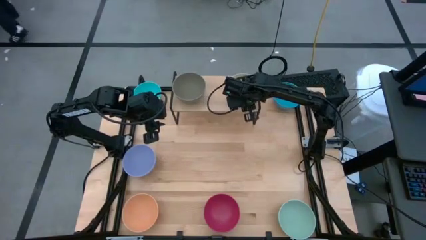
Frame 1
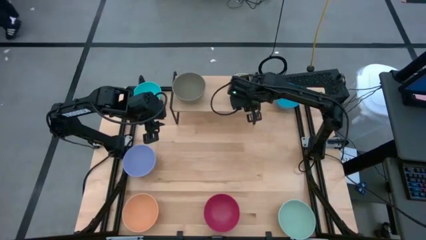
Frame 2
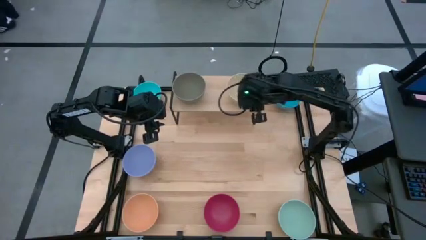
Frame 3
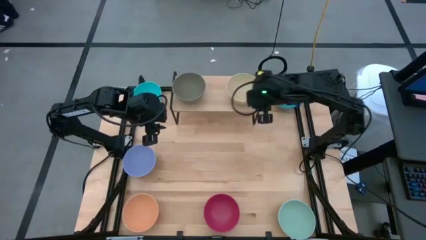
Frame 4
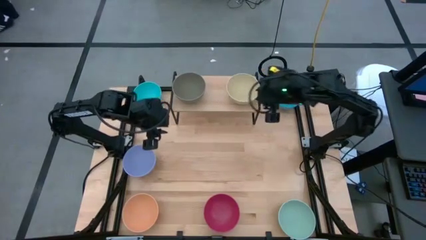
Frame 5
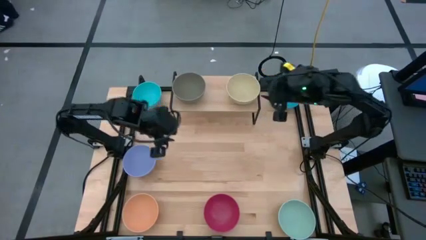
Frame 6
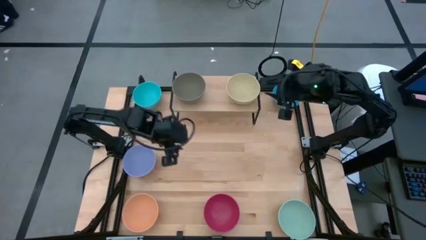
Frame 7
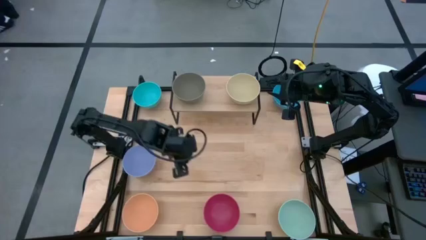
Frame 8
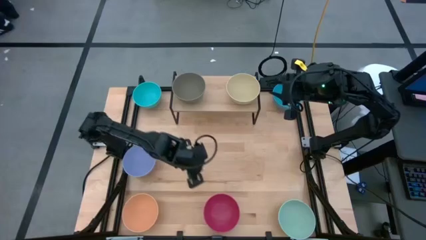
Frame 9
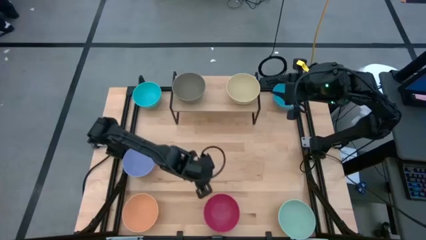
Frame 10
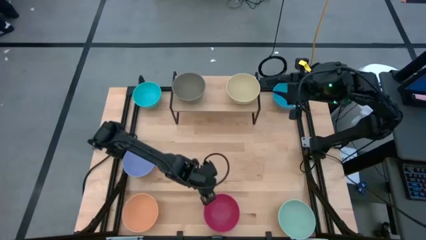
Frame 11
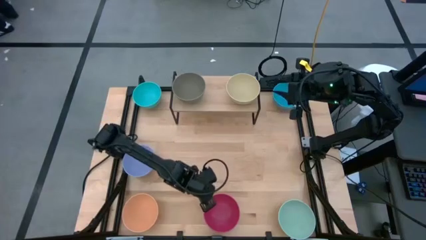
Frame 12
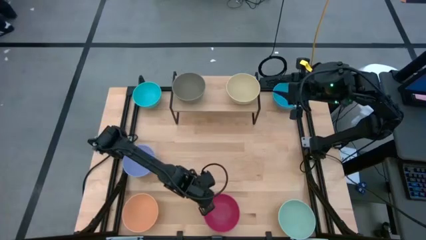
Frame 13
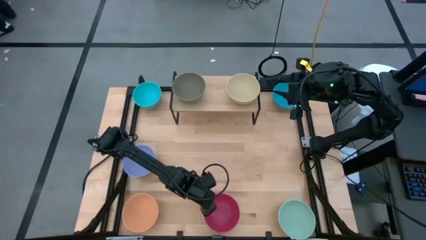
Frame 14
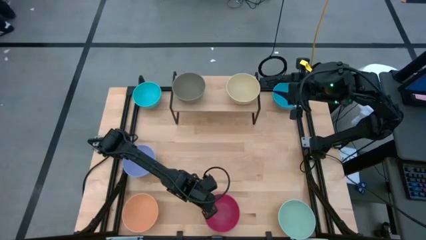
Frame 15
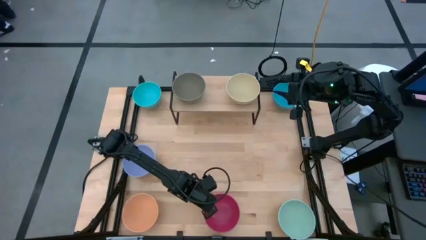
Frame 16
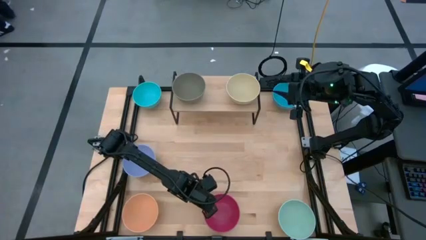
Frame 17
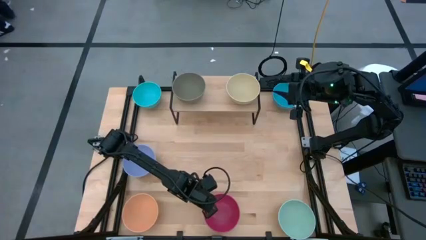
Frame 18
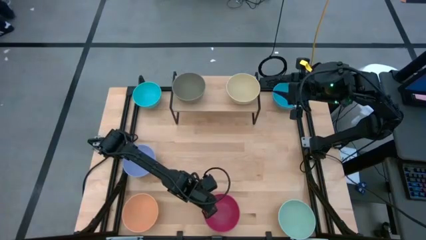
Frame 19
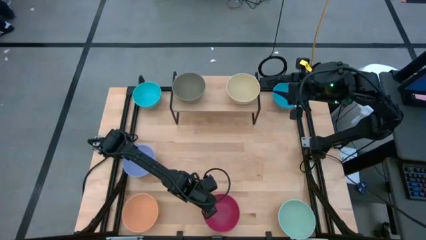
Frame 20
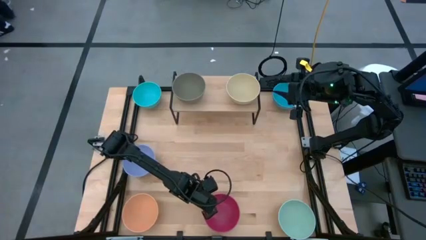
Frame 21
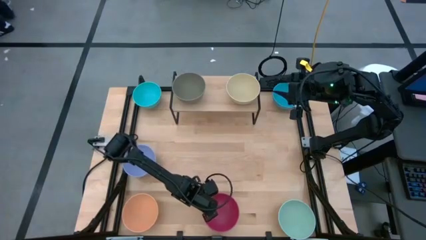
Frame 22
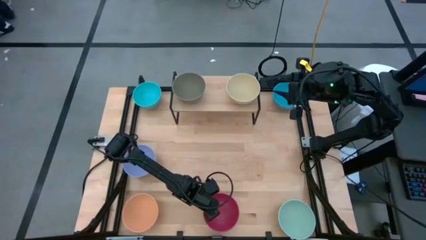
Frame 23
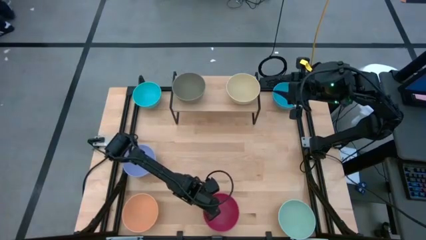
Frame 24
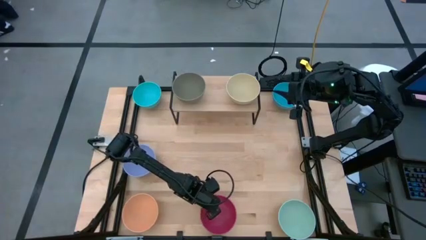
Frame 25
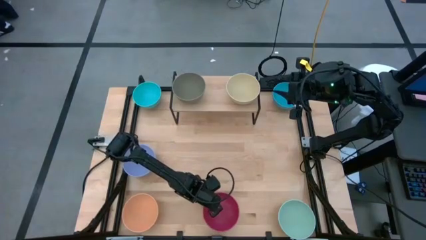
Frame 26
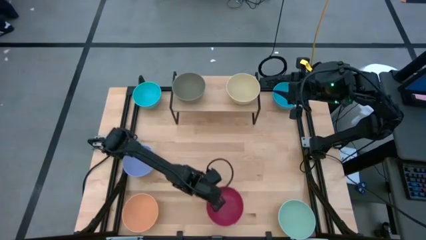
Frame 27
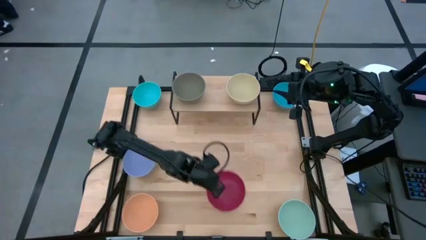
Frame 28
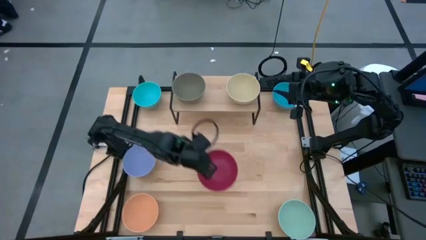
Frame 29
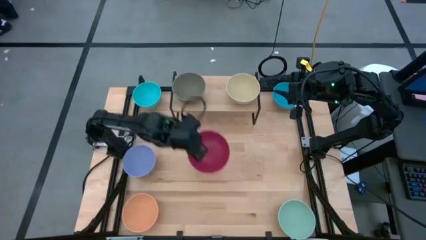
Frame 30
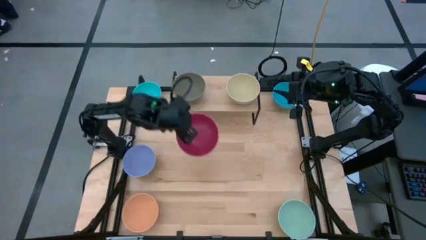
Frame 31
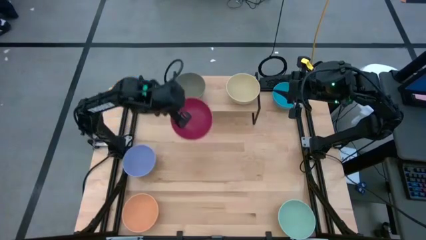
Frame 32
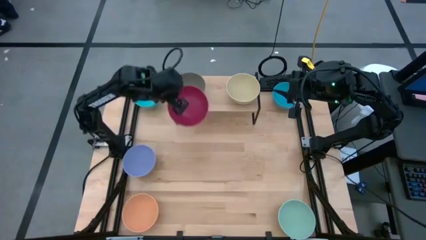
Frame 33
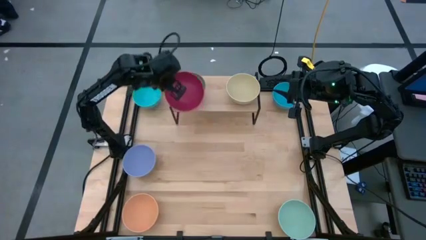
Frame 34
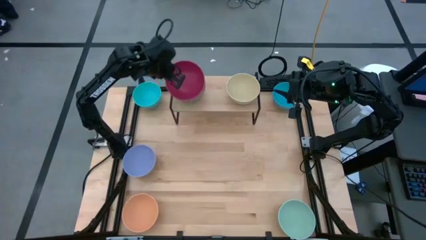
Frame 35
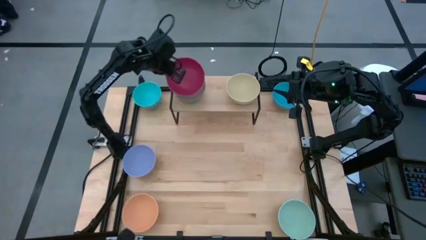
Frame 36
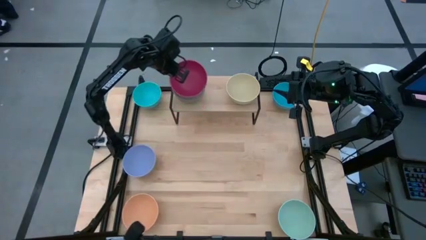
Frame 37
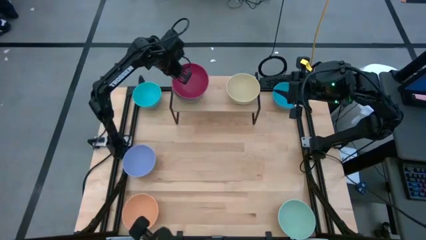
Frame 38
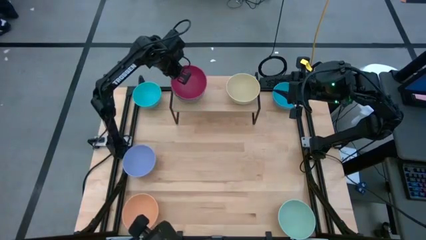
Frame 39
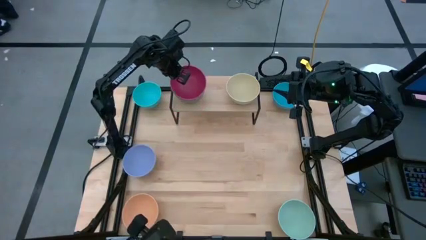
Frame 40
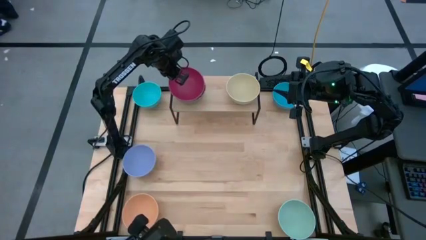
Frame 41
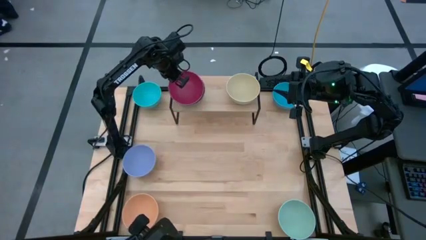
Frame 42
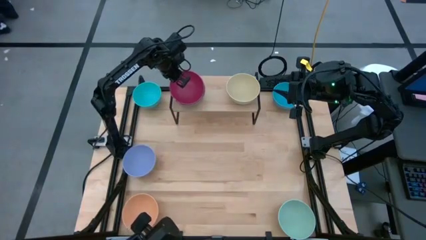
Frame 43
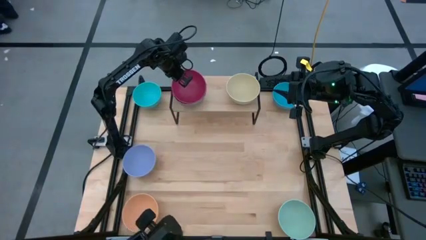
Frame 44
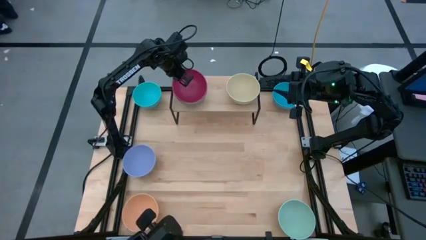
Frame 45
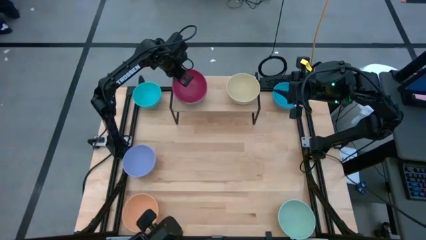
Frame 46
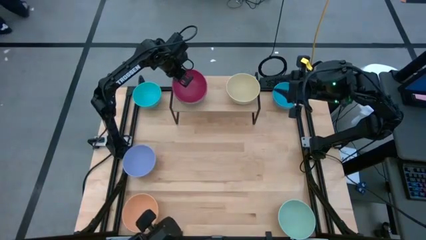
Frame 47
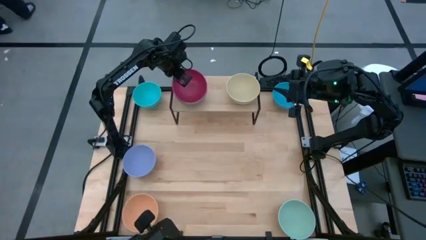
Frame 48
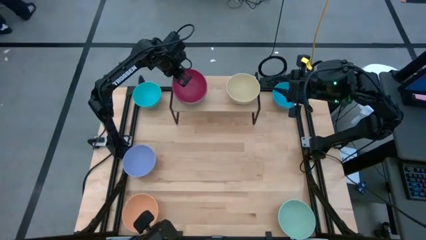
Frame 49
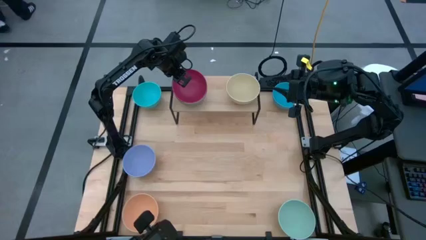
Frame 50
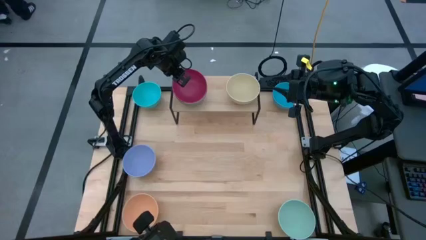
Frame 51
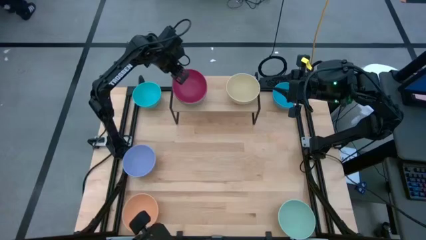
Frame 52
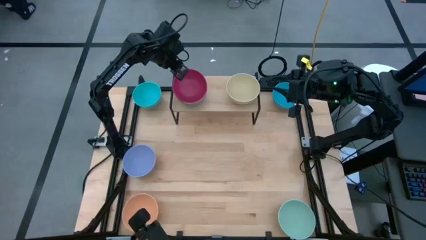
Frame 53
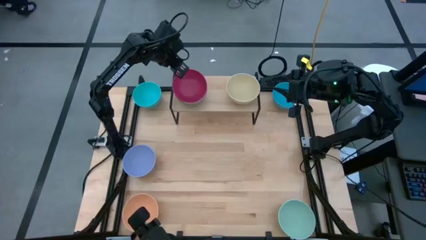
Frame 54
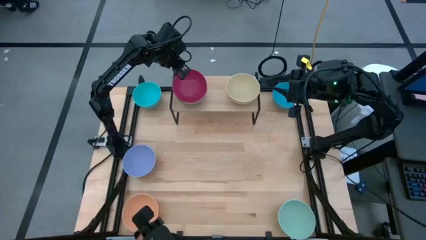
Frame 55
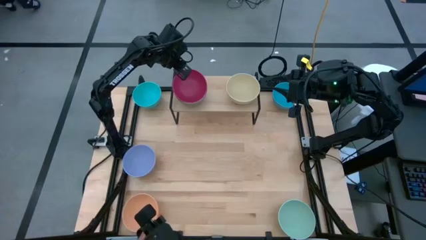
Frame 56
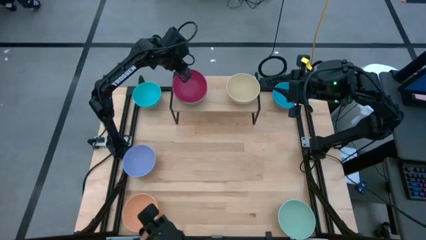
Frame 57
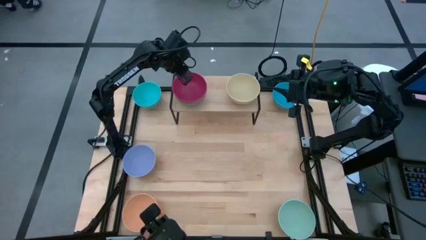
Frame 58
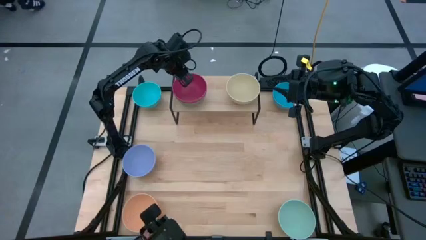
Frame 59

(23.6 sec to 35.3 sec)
Task: Place and stack bowls onto a shelf
Stack the pink bowl on top of the gray bowl on the shelf

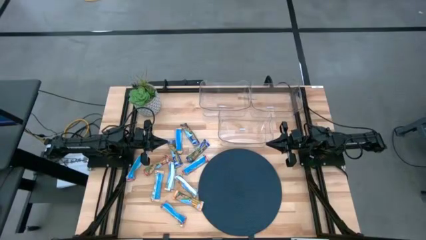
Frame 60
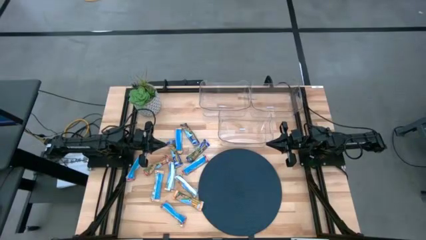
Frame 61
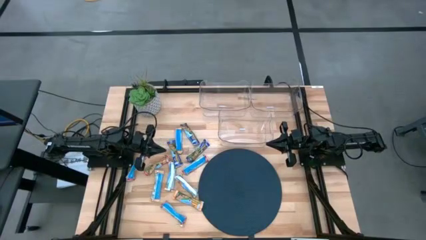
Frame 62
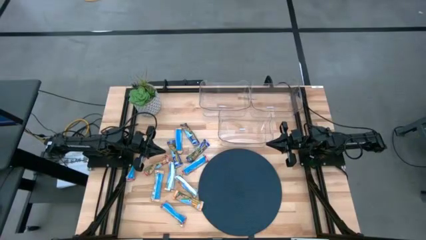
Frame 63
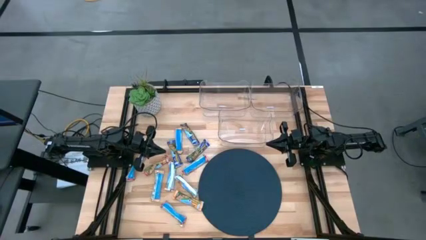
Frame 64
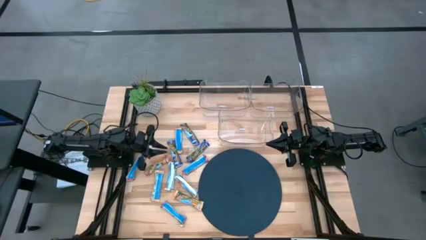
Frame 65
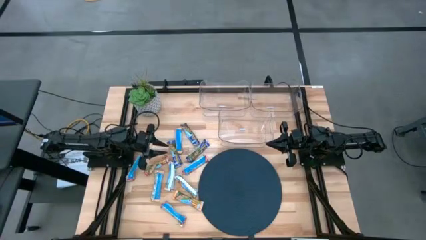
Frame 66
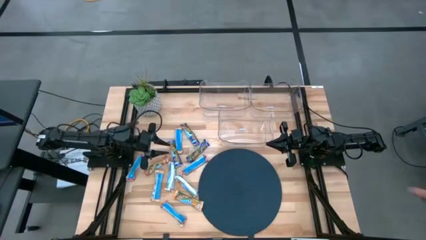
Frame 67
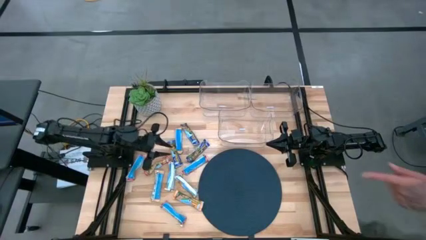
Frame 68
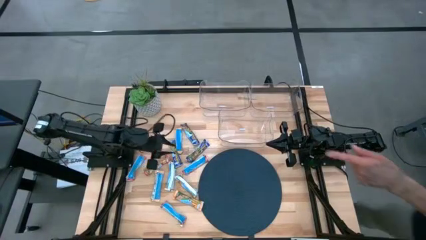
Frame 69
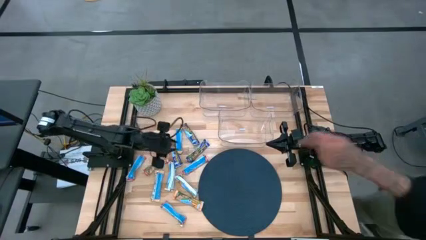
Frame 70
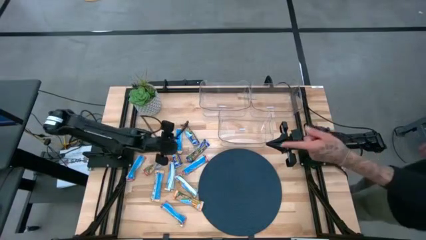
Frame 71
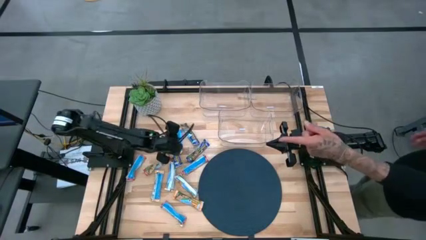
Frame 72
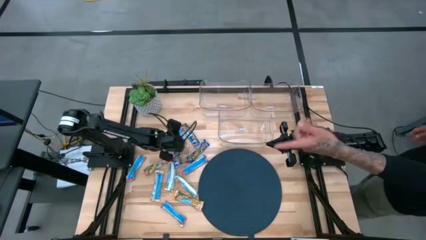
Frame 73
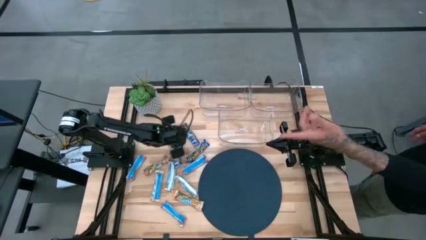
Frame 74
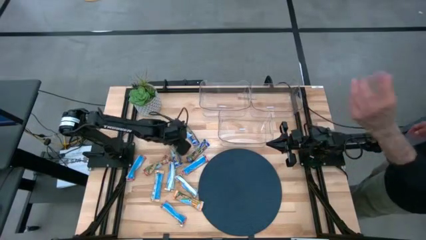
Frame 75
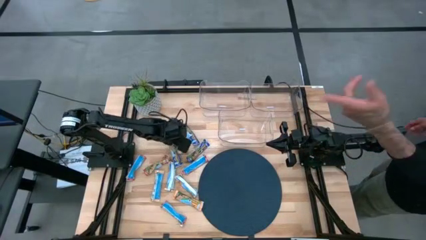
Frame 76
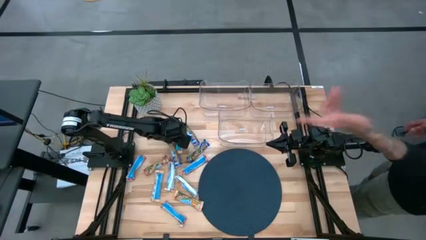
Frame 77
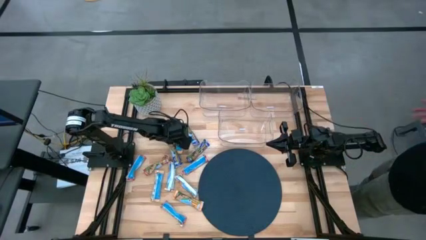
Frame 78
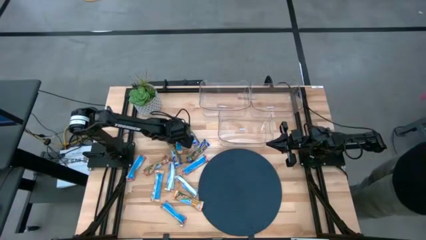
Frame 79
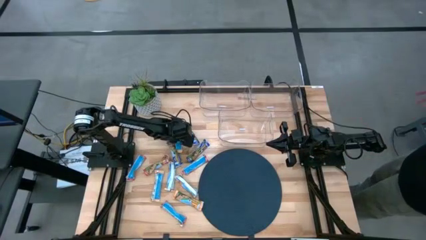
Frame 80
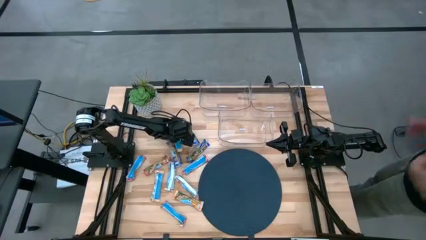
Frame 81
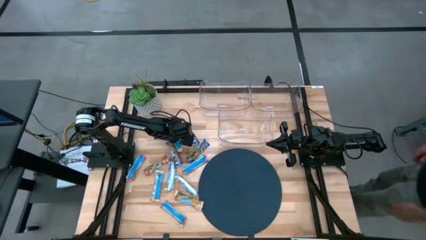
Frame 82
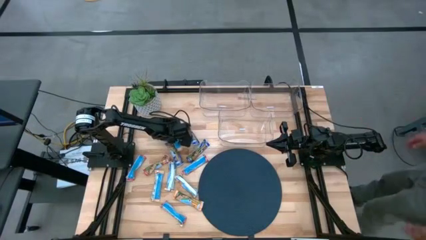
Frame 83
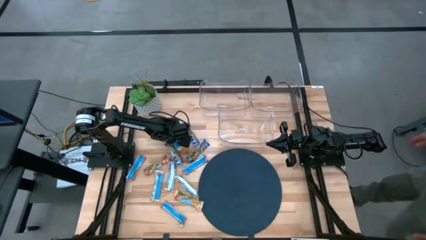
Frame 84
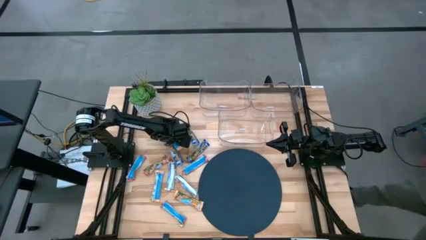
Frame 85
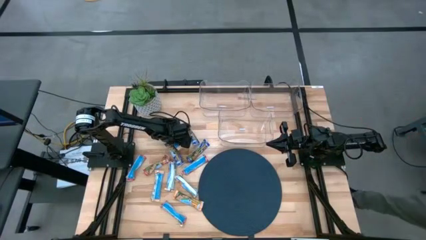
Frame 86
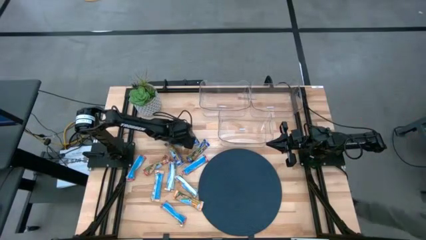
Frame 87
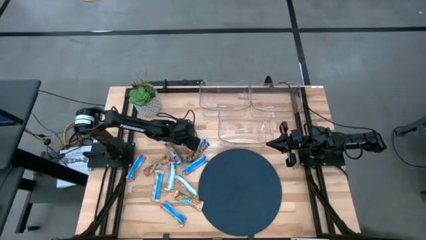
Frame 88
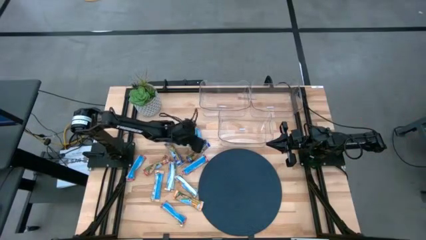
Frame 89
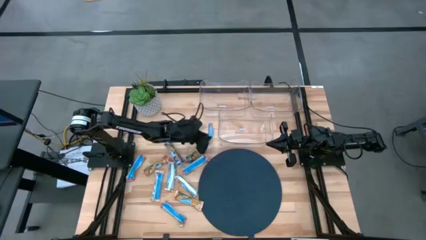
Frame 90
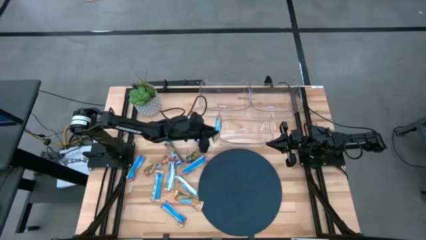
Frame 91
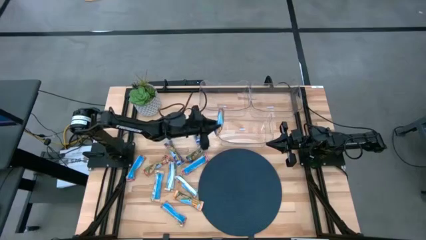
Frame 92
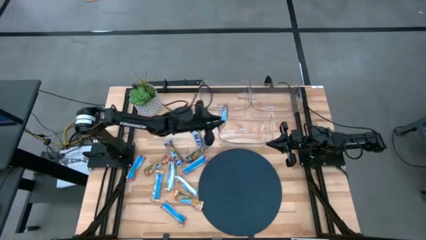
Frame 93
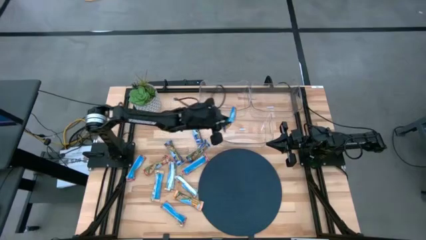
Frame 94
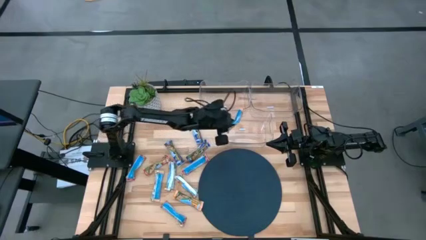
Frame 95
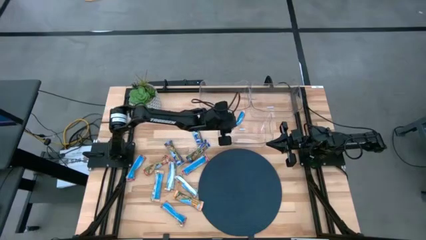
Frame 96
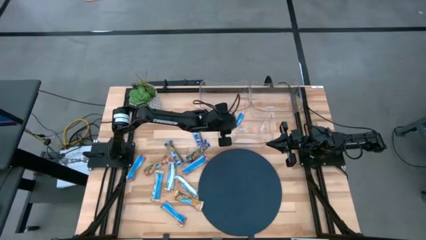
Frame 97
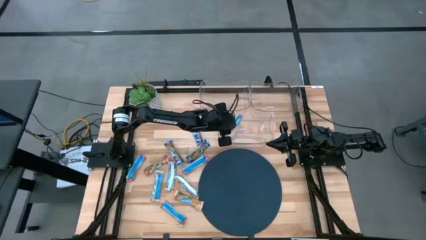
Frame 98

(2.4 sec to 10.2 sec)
Task: Pick and place Granola Bars by type
Put the yellow granola bar into the bottom transparent bin
